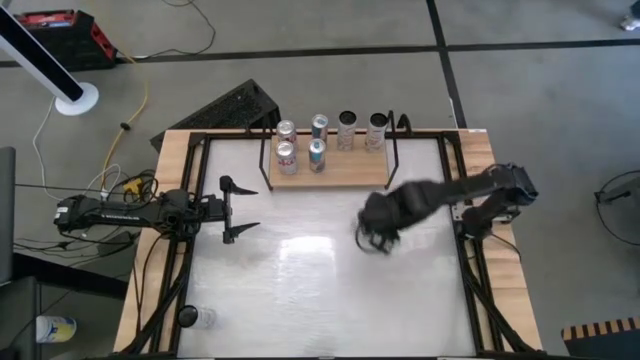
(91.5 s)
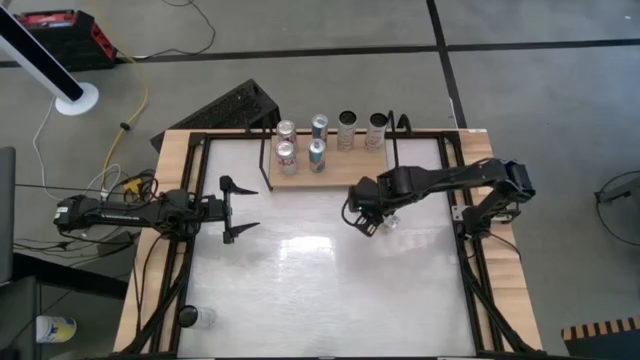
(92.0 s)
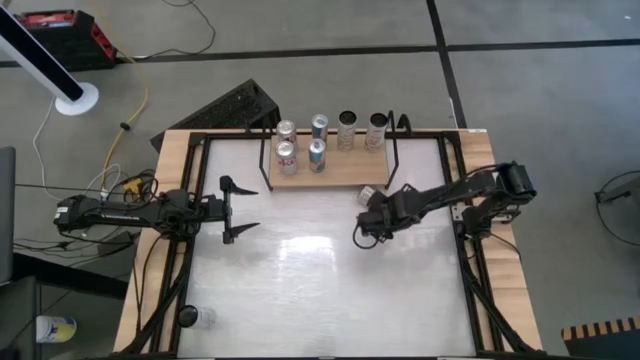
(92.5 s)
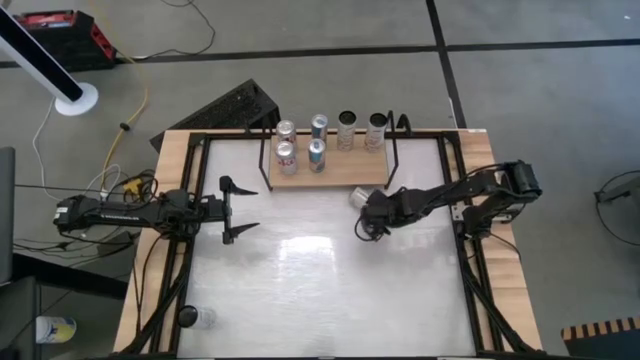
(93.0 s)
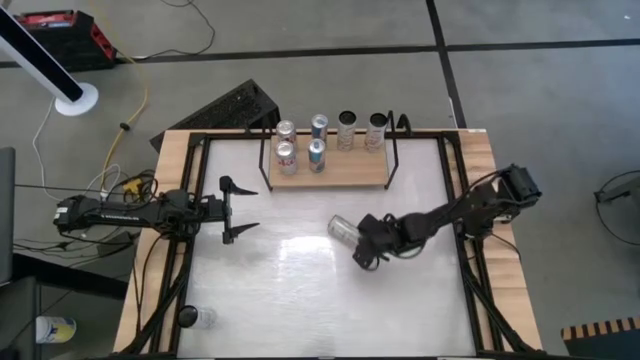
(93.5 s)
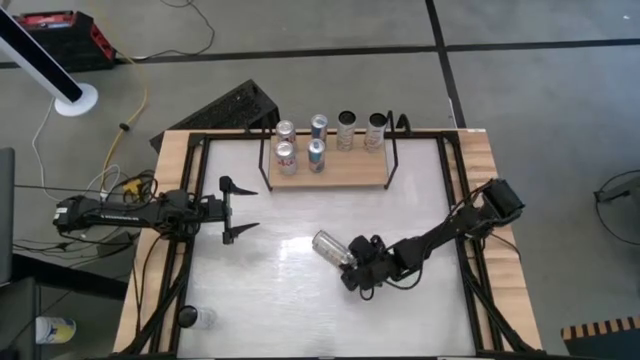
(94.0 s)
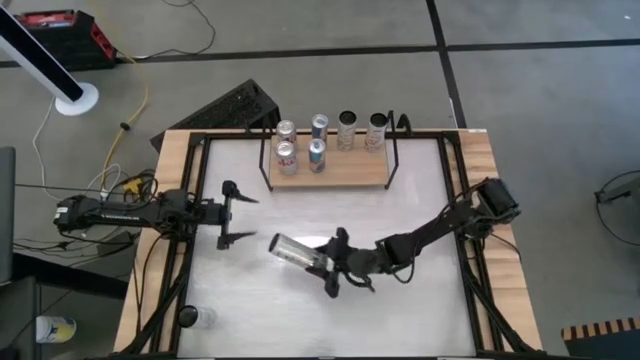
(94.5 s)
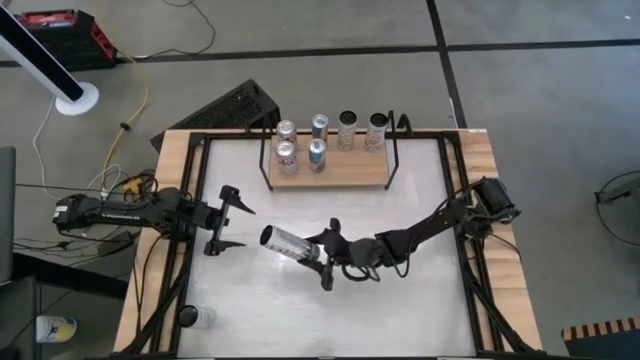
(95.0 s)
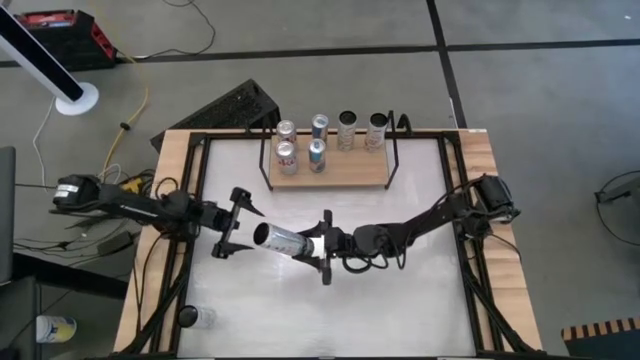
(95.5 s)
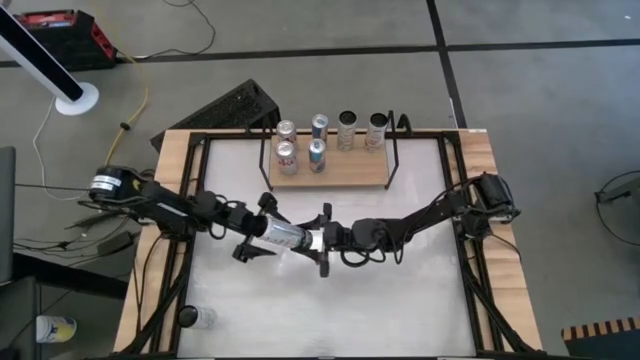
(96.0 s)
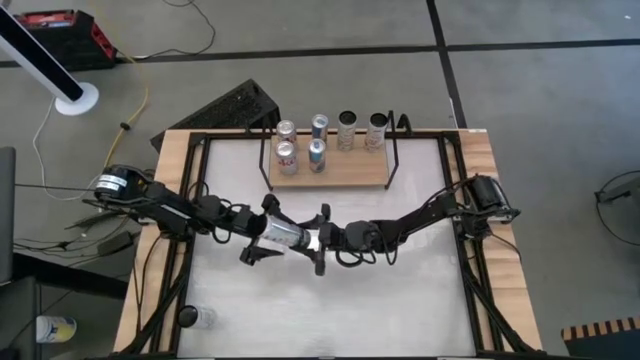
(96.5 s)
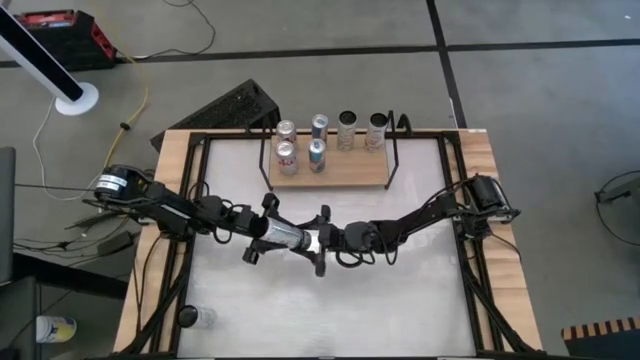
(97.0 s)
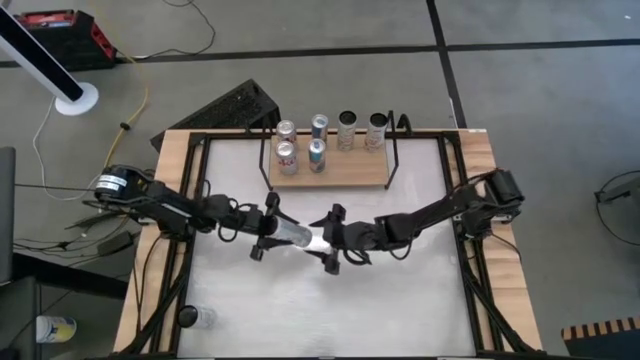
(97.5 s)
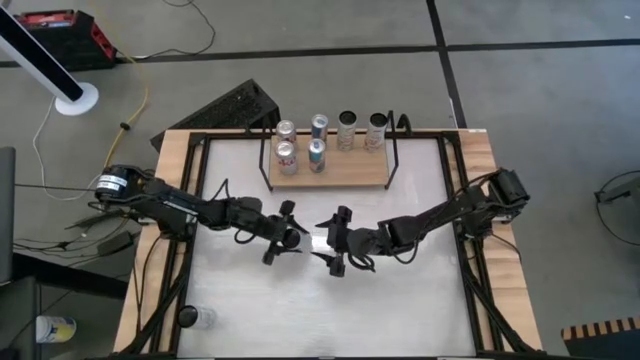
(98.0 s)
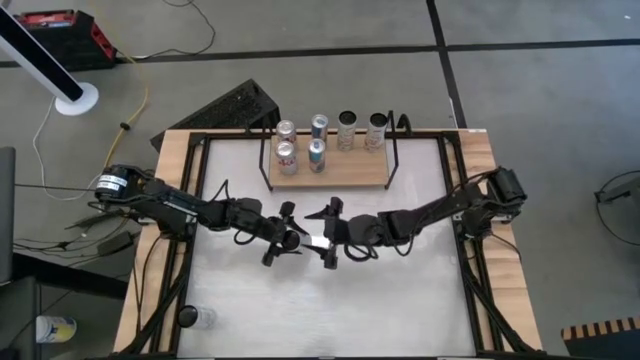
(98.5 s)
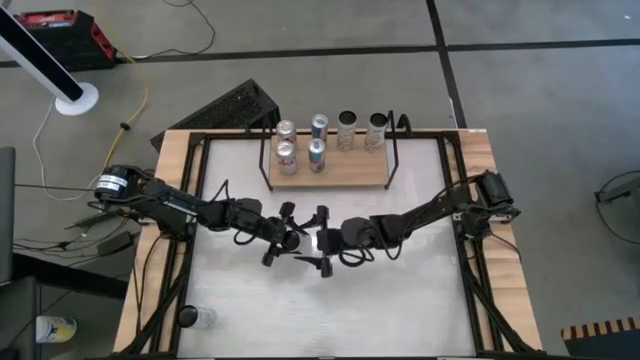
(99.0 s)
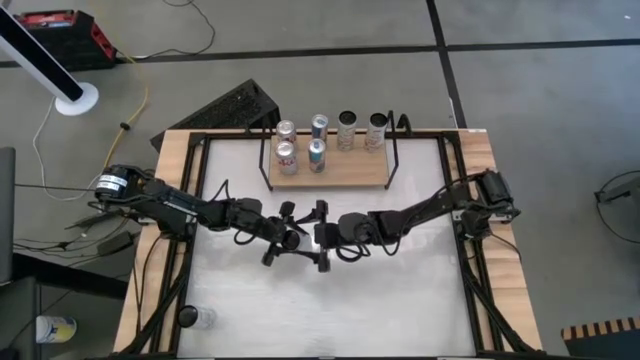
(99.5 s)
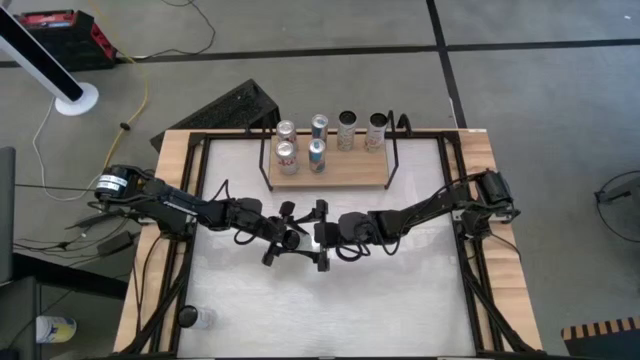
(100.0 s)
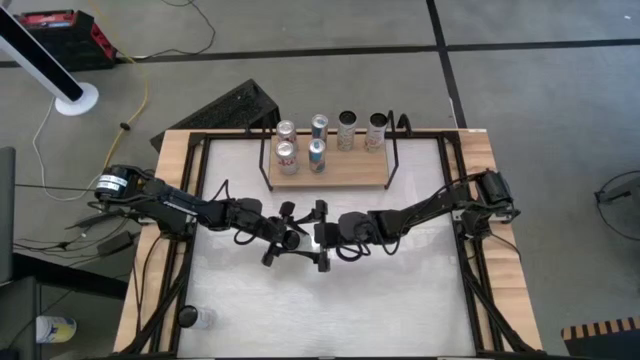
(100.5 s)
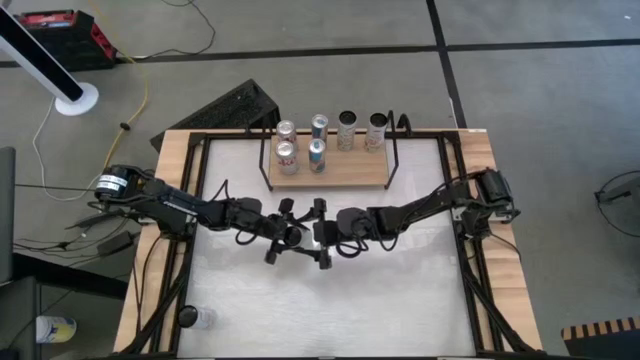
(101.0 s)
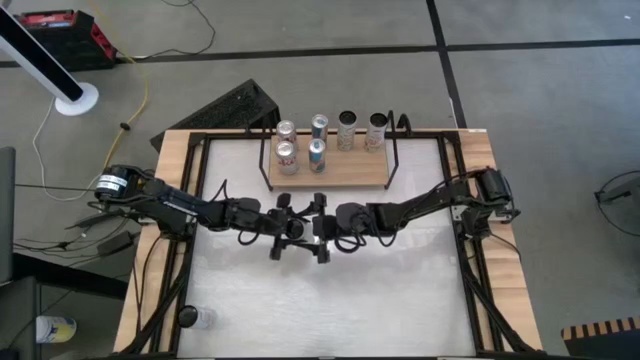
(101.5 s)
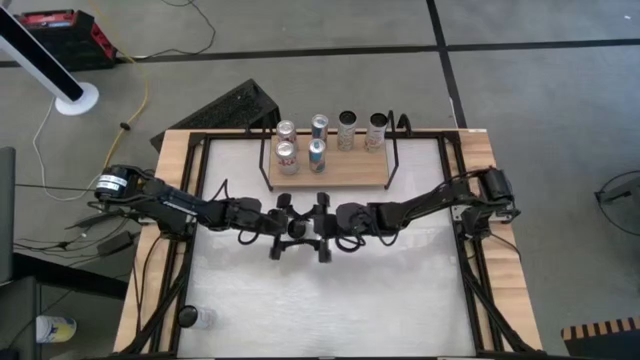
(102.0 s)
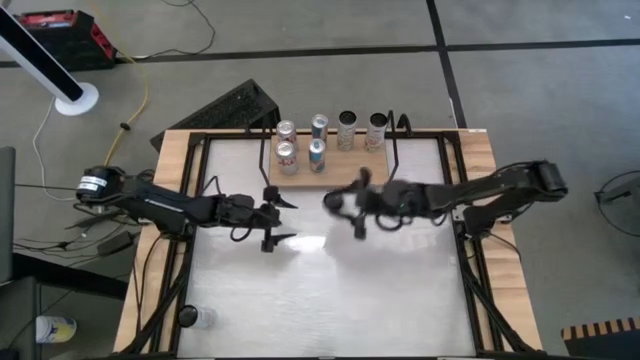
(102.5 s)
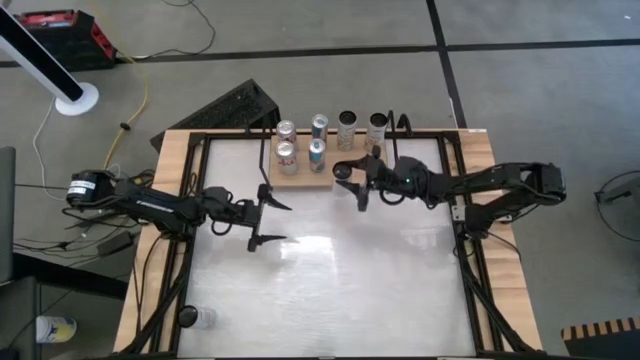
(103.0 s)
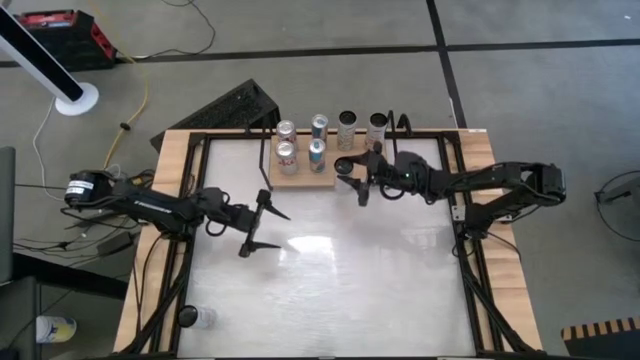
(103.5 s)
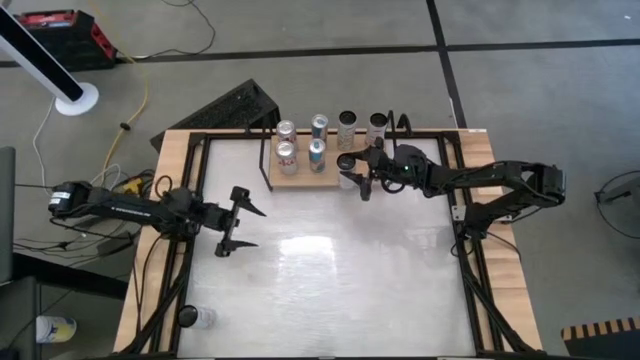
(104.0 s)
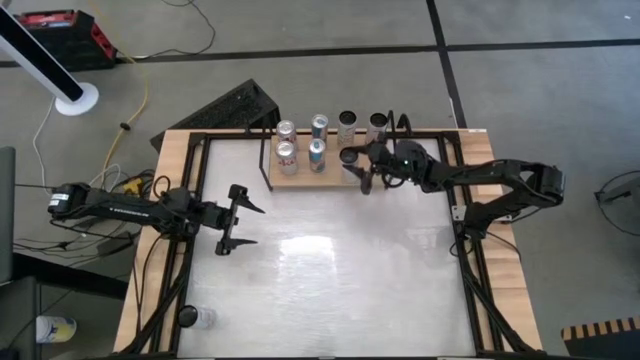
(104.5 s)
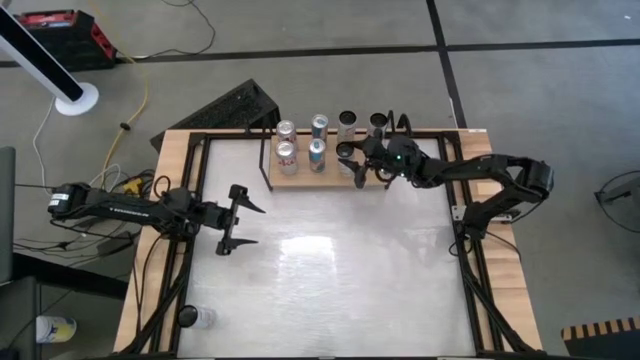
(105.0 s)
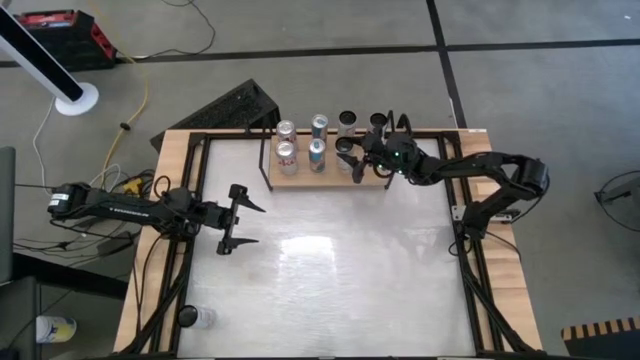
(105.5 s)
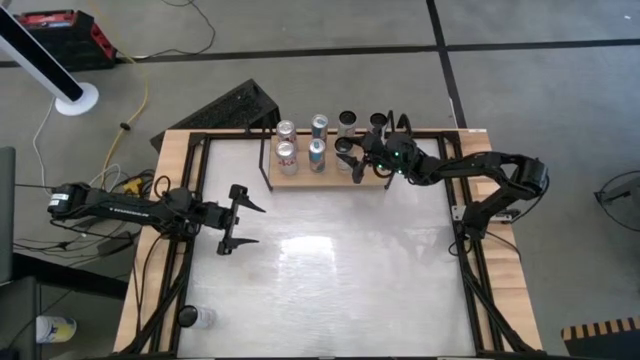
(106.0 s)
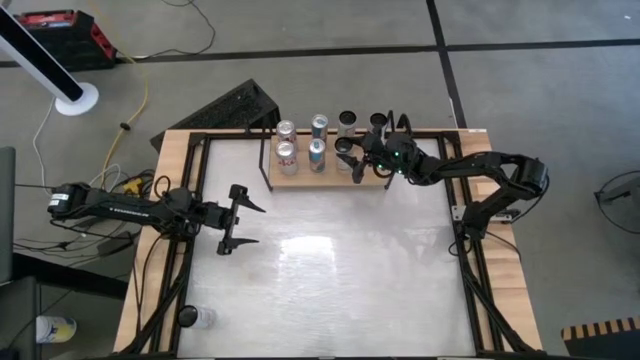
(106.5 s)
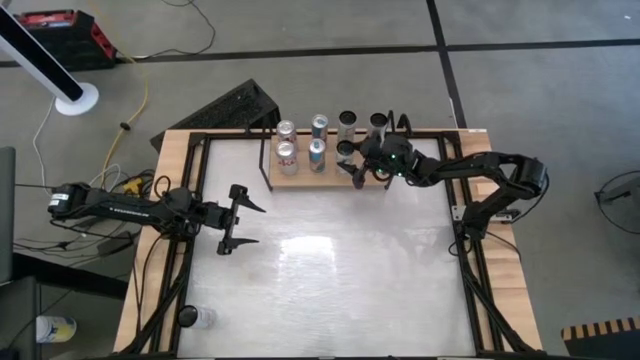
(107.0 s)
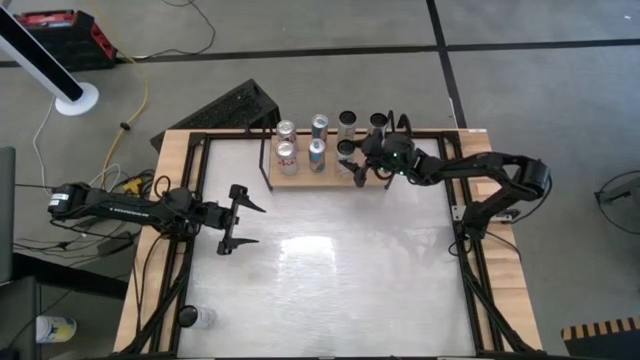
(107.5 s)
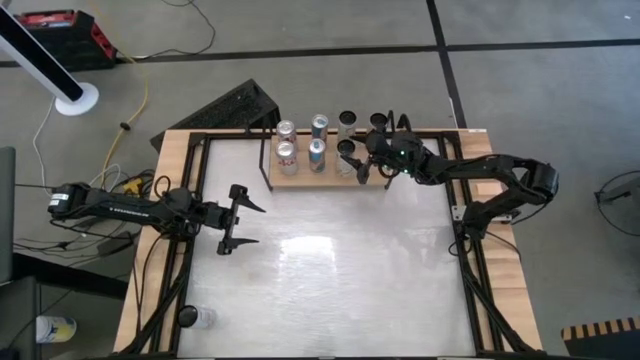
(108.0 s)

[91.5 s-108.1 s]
Task: Place canned beverage on shelf
Put the white-yellow soda can on the shelf aligned with the other white-yellow soda can on the shelf

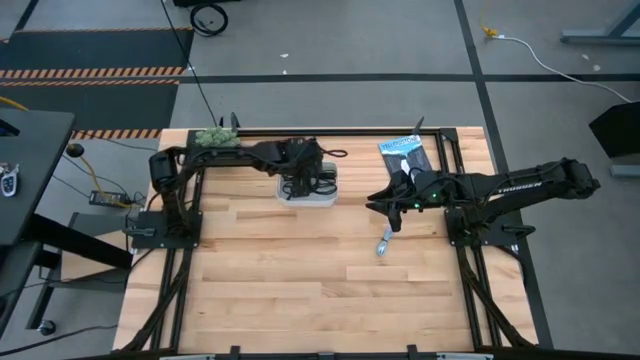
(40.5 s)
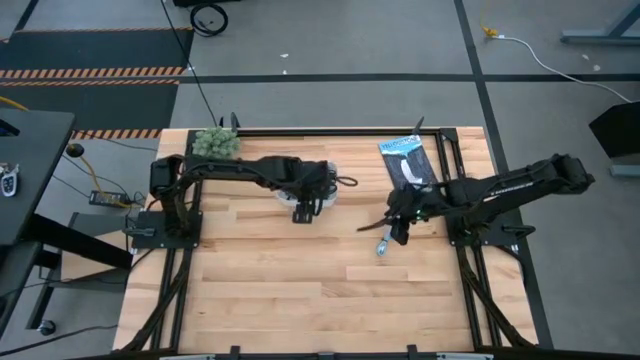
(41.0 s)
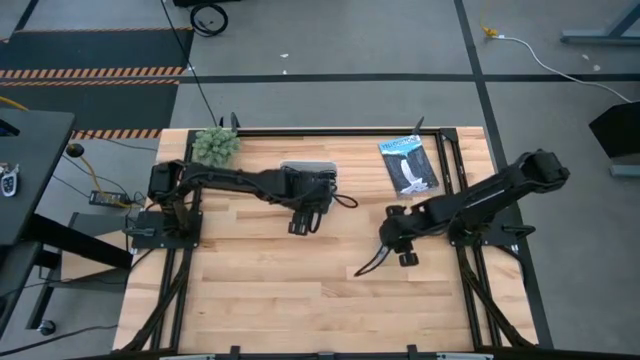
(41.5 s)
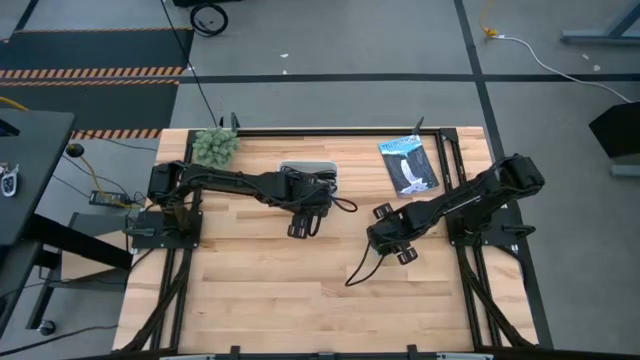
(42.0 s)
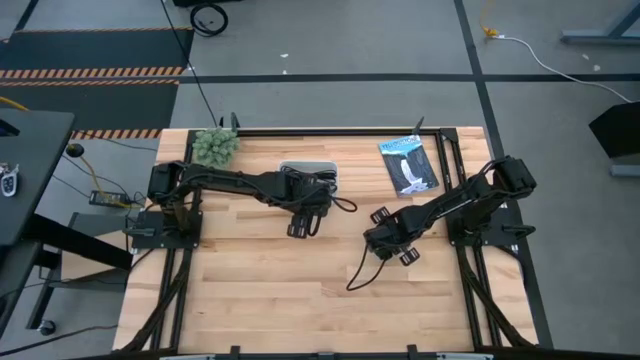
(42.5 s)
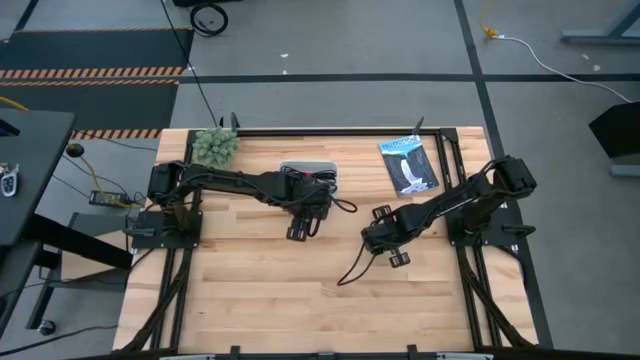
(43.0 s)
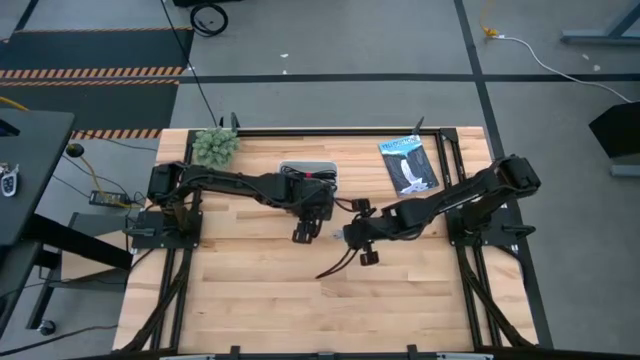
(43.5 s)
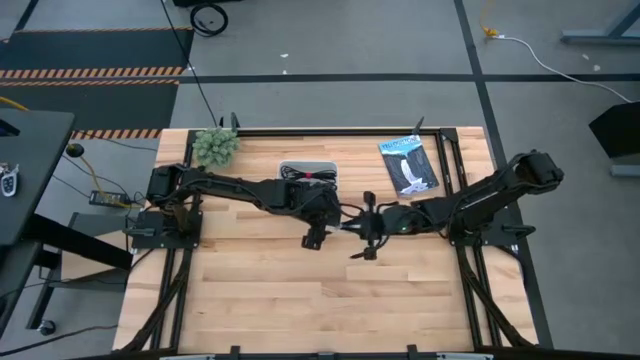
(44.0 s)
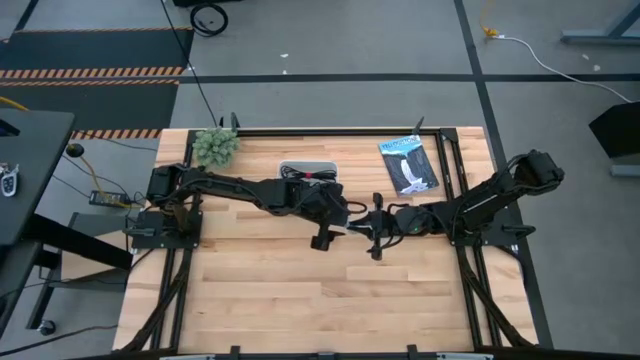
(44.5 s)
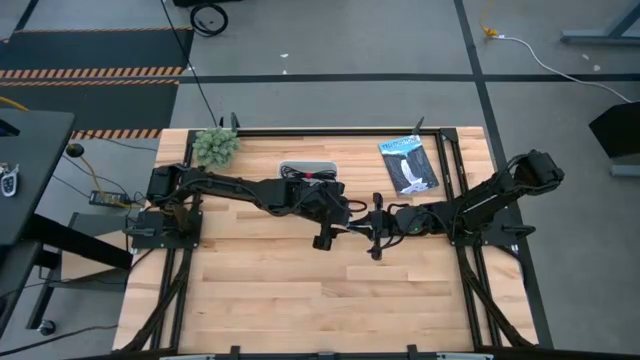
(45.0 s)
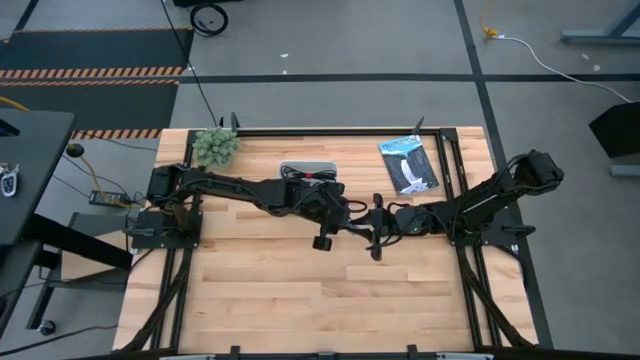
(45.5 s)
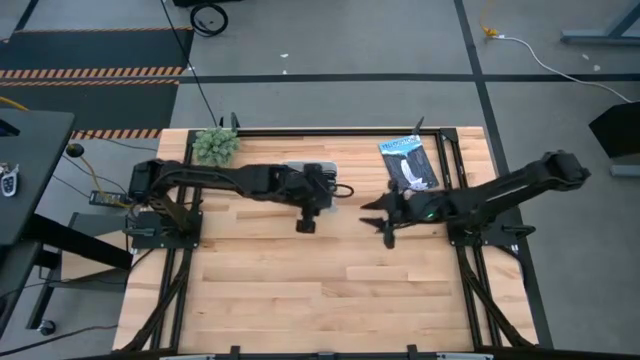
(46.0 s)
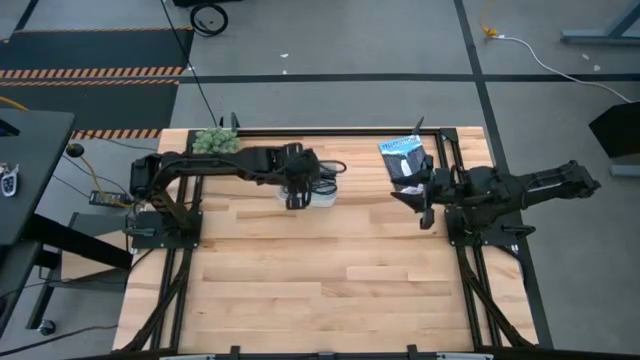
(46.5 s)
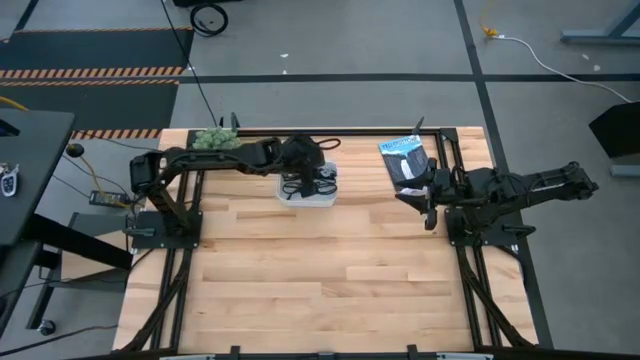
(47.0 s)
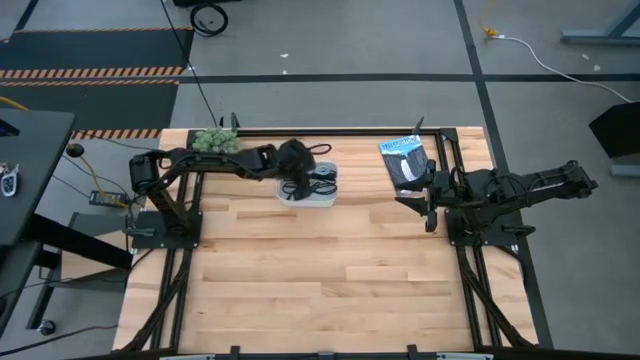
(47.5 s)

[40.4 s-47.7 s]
Task: Pick and place USB-C Cables
Put the blue charger cable into the white bin
